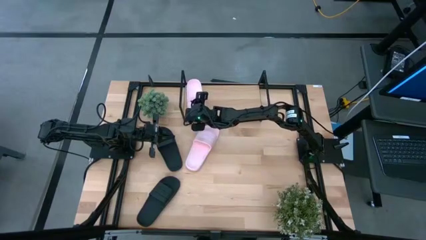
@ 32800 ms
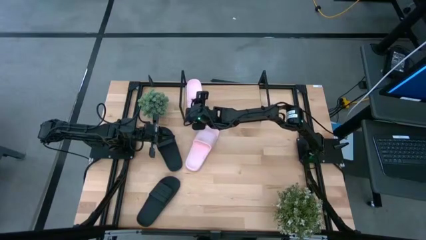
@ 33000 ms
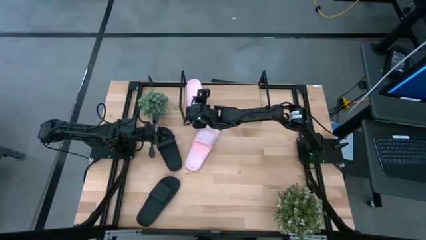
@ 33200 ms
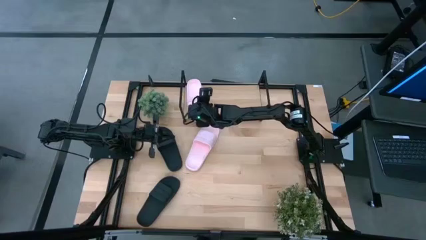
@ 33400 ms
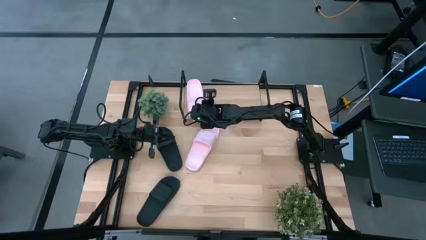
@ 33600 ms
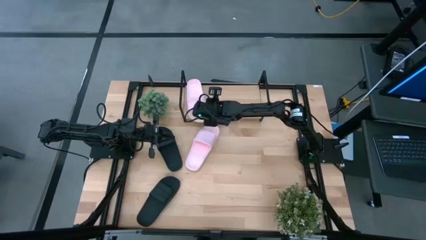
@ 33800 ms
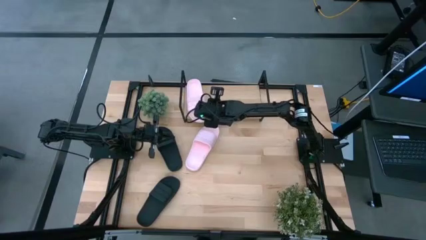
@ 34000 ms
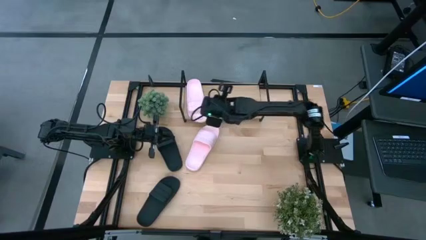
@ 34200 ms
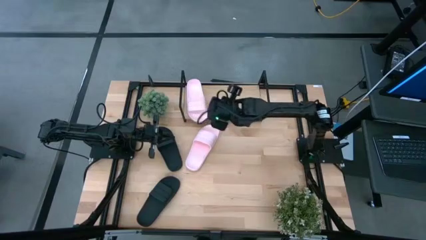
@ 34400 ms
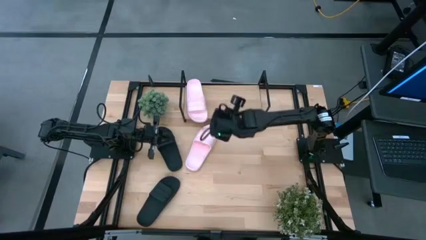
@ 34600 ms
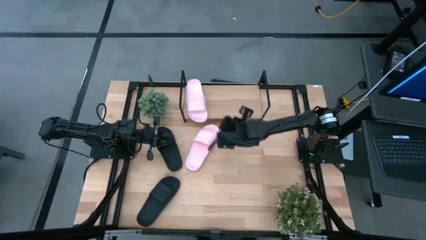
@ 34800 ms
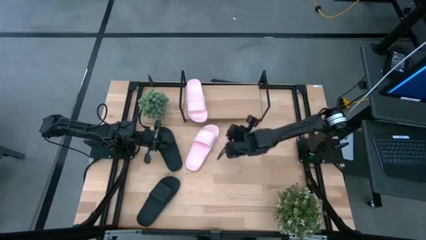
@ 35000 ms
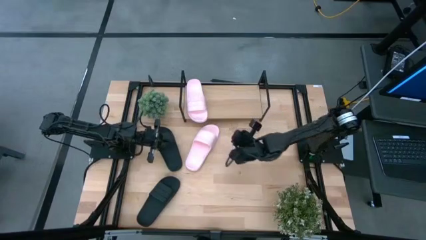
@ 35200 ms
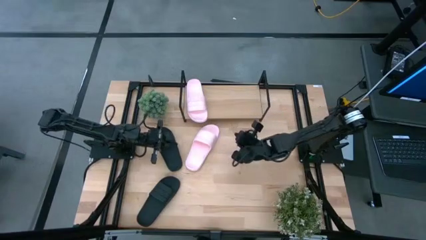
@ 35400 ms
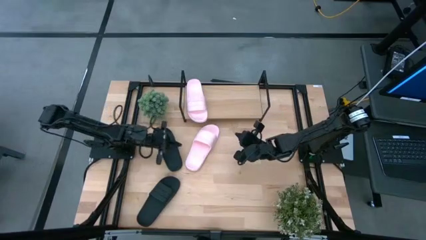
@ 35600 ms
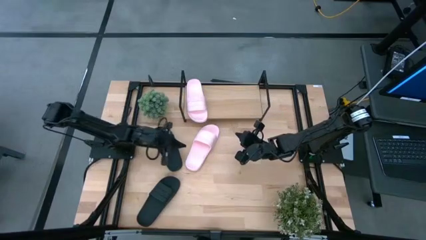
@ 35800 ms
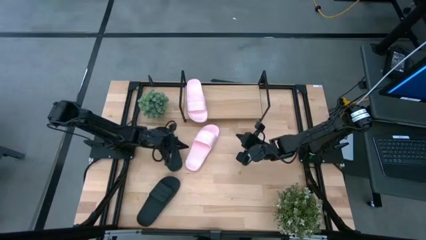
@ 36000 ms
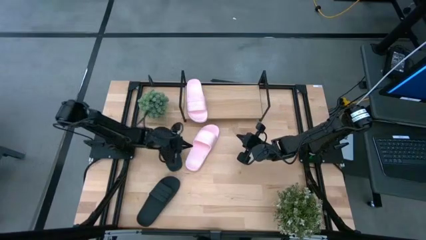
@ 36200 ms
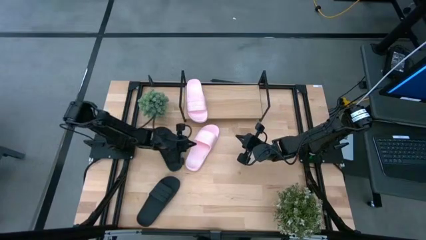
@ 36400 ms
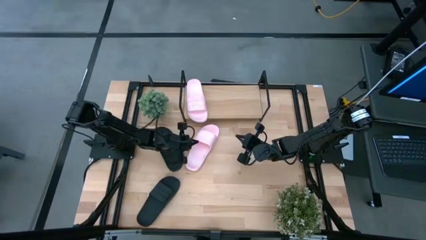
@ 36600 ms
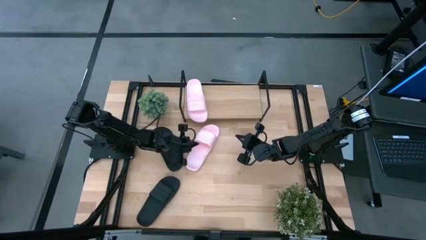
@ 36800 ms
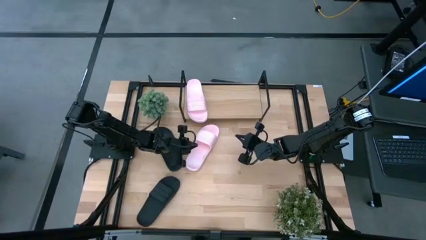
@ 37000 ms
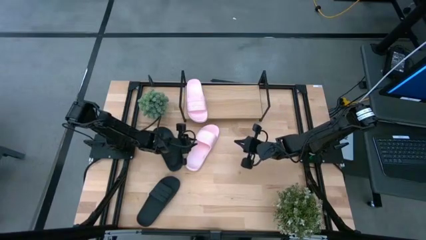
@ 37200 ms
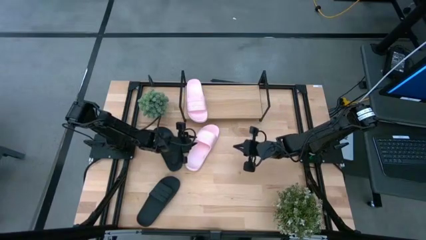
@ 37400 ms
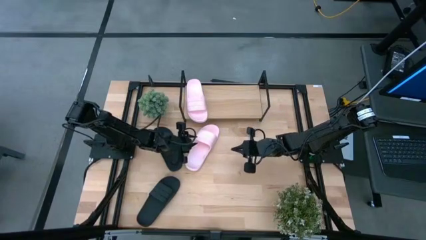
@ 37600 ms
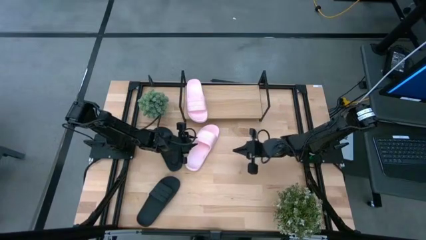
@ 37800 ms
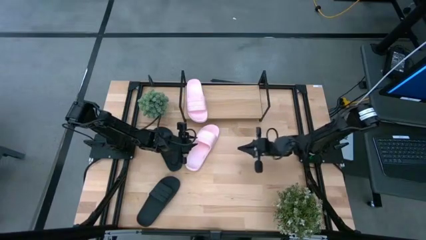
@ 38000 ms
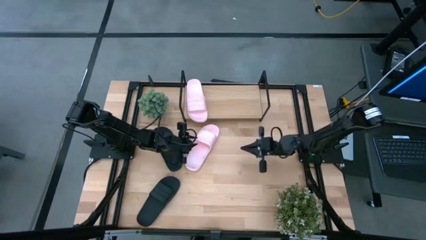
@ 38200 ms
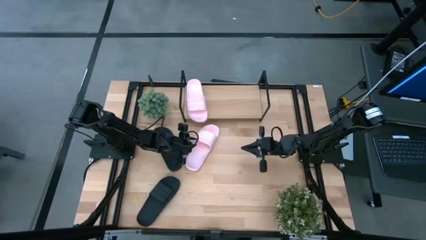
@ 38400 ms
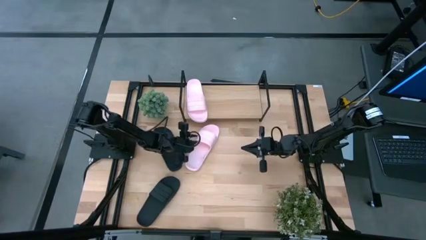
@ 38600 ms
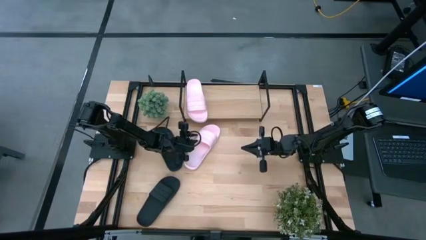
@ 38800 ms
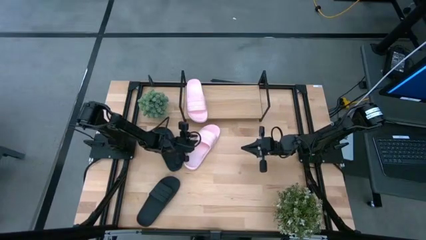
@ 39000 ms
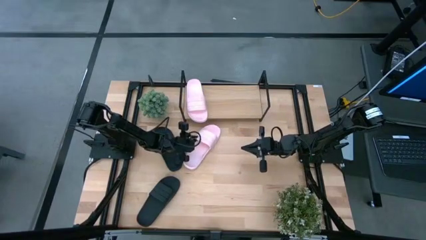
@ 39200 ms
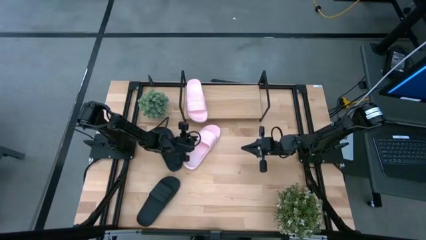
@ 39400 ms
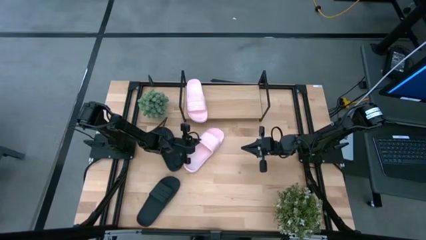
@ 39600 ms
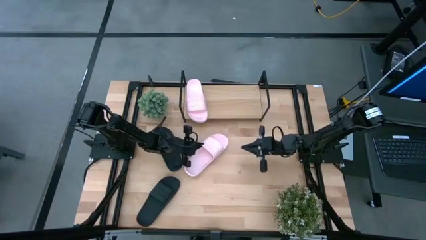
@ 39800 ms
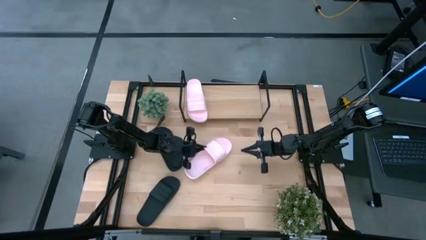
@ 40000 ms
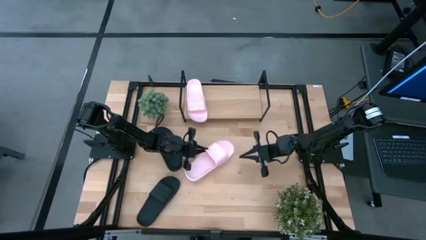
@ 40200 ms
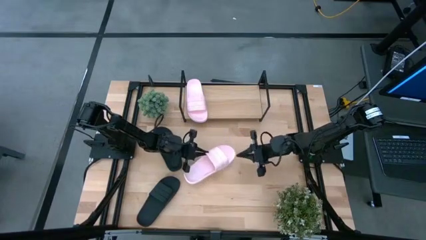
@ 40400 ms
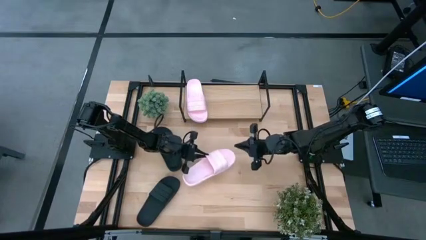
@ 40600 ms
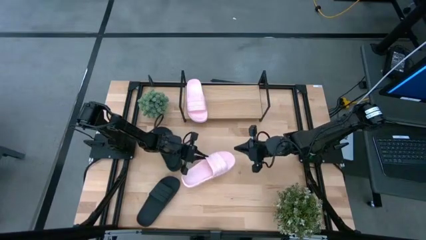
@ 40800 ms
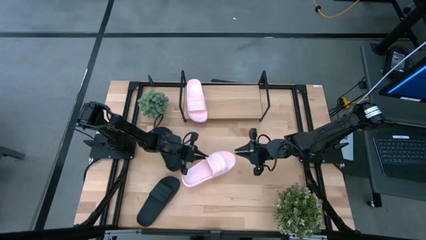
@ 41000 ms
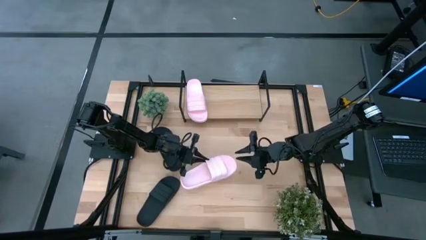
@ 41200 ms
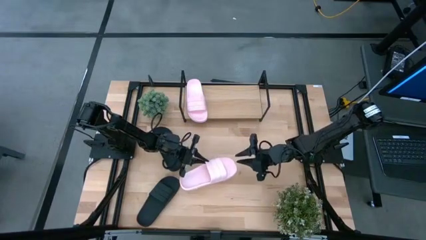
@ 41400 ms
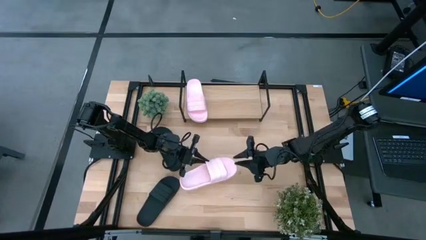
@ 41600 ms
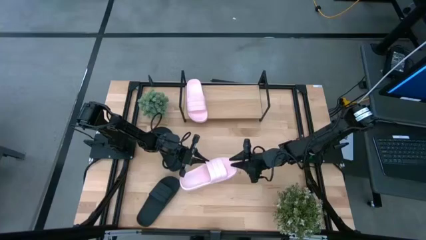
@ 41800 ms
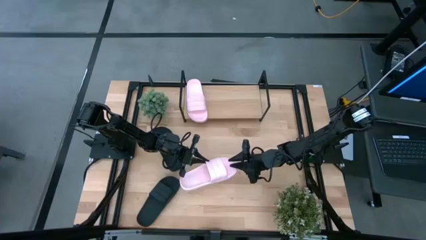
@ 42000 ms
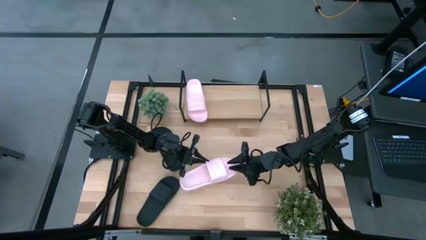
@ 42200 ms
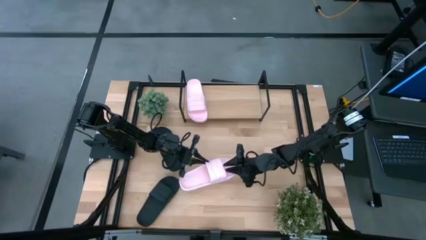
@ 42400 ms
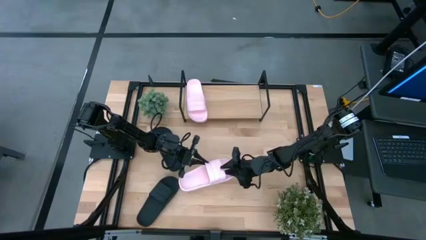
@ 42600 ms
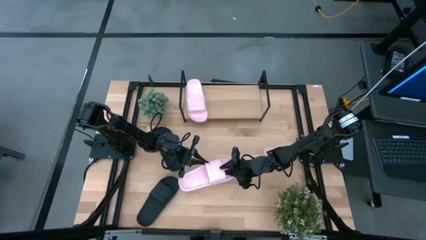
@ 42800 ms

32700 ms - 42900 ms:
Task: Pick and place slides into the shelf
Put the pink slides on the shelf

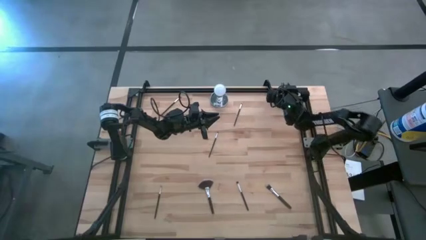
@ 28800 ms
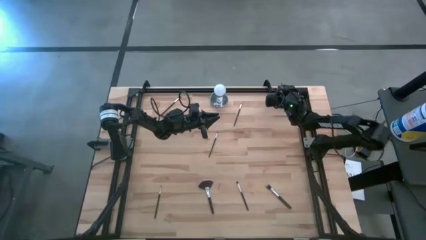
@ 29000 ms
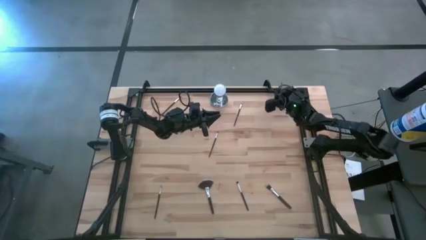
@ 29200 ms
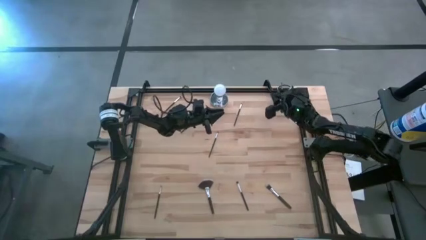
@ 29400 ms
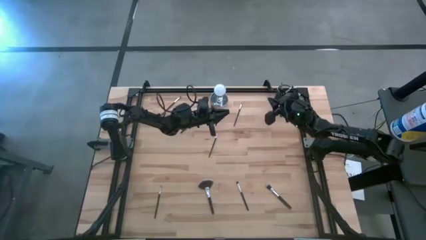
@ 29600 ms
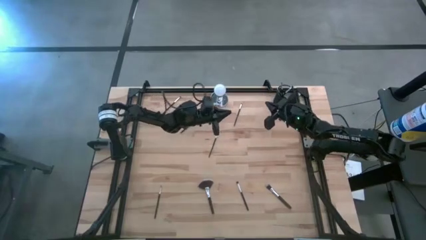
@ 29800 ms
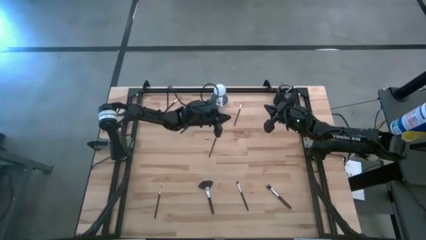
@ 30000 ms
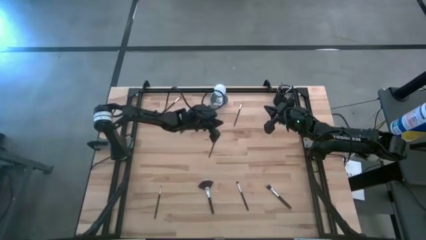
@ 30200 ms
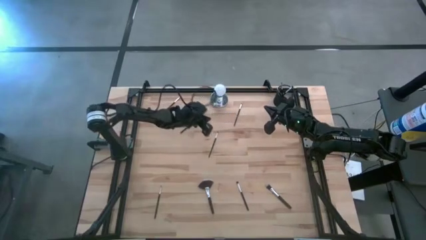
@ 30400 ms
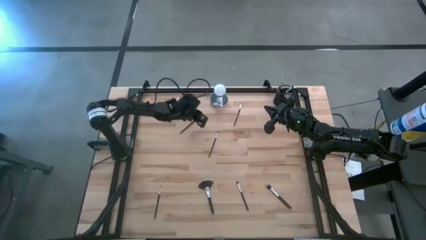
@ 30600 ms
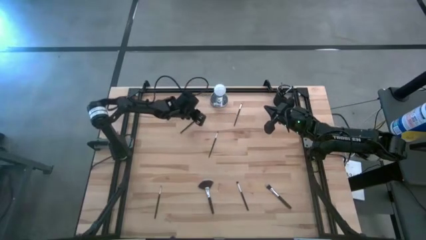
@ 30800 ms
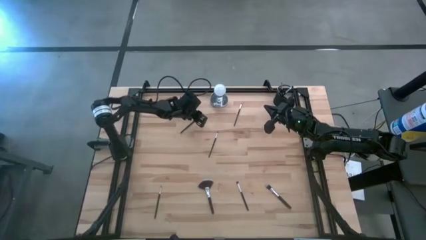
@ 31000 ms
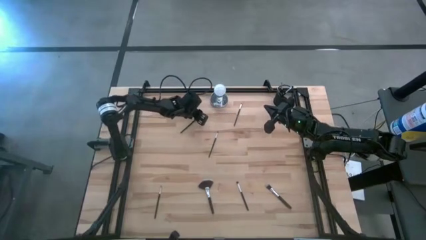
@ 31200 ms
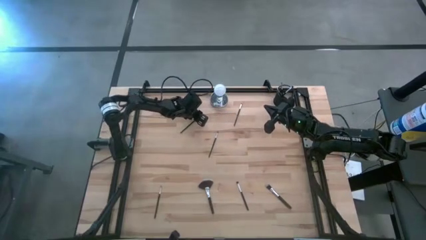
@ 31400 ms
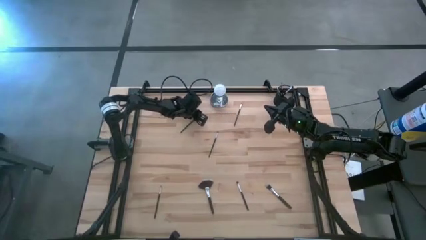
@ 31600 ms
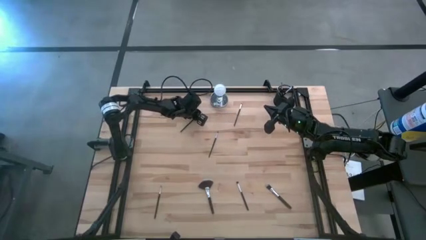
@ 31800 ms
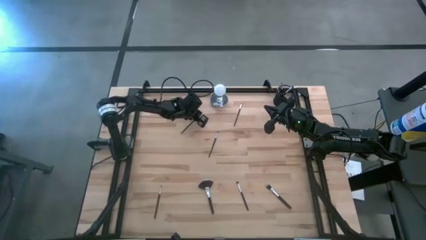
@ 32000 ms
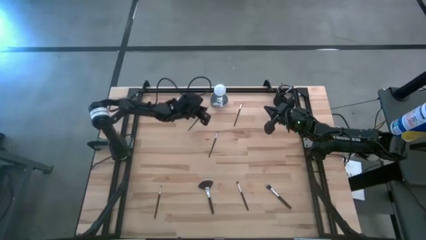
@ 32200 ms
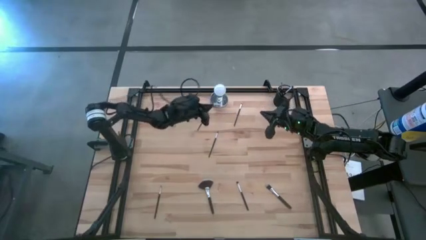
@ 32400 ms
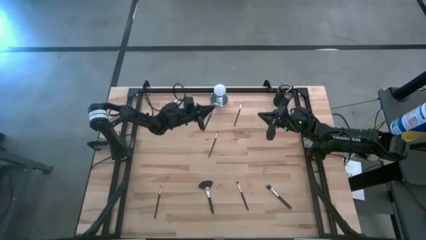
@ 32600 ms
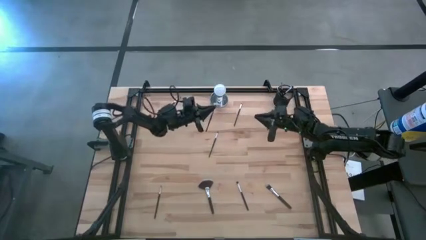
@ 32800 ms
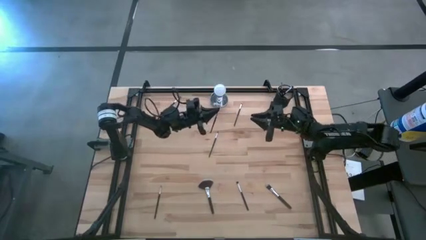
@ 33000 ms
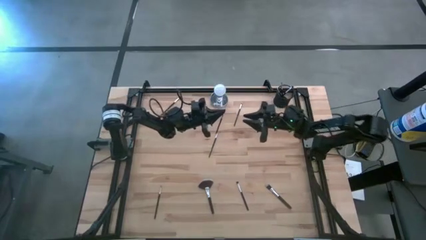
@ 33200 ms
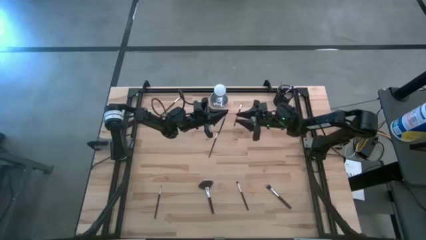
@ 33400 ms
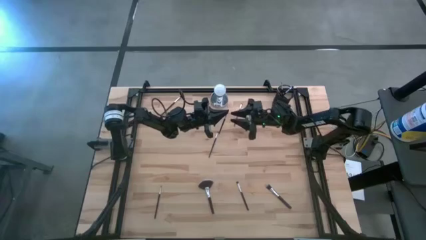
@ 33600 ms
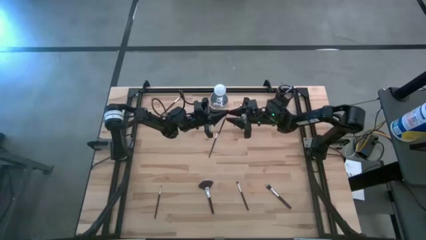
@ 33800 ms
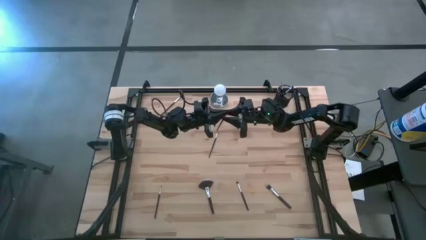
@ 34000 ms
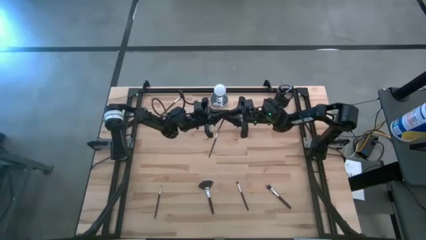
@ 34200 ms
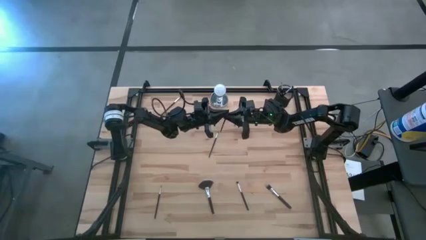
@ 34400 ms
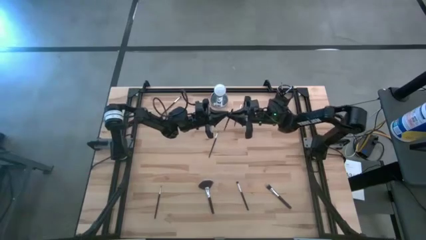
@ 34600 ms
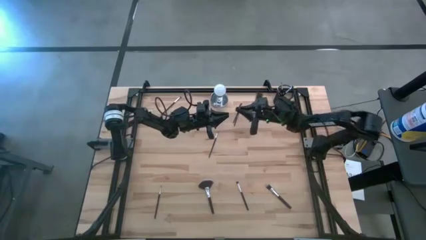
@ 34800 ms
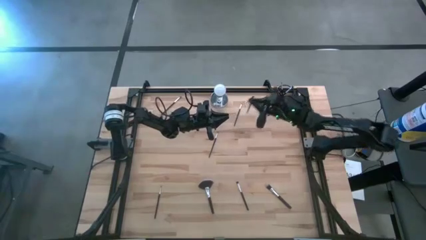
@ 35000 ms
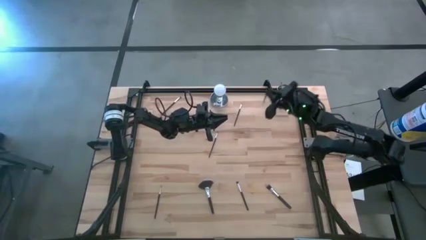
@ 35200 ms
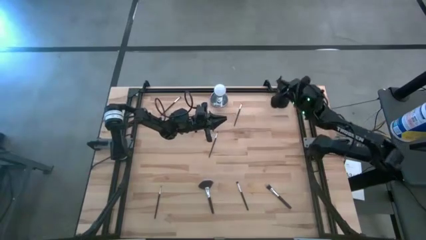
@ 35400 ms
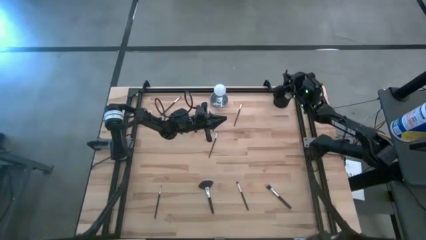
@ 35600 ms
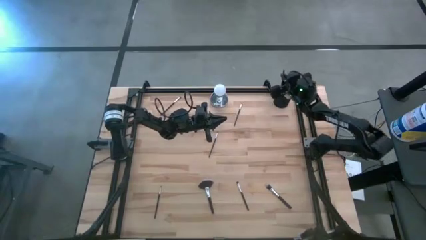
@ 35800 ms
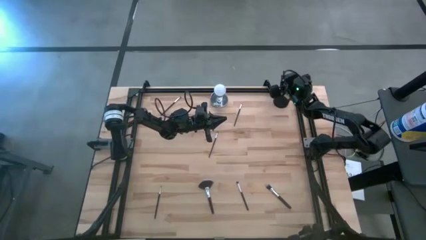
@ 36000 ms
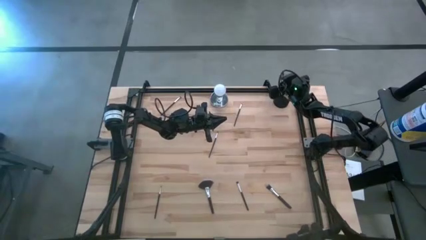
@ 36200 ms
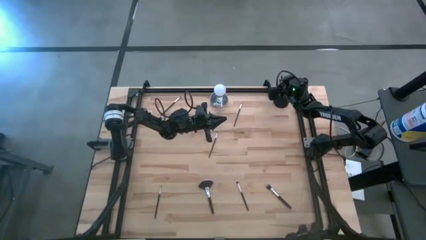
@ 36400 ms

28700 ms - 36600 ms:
Task: Pick & Place Makeup Supplies
Put the makeup brush into the makeup holder
